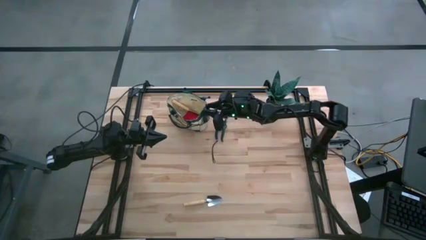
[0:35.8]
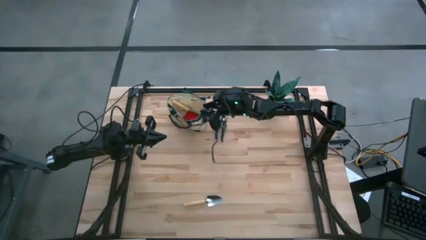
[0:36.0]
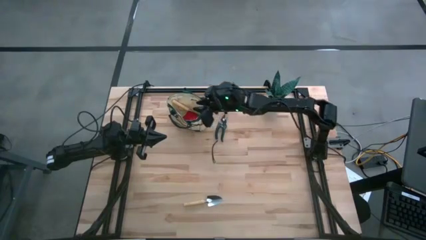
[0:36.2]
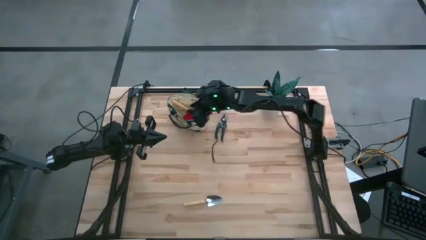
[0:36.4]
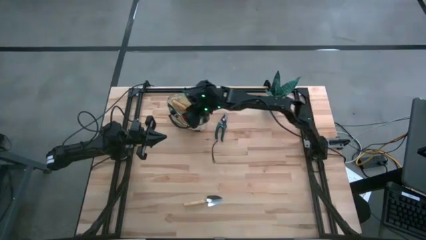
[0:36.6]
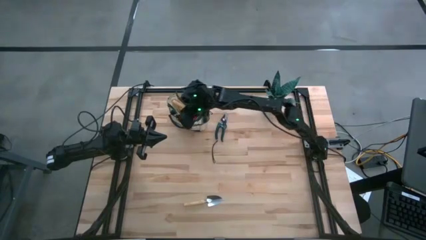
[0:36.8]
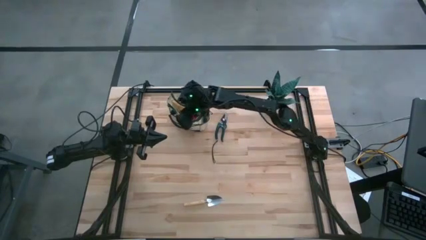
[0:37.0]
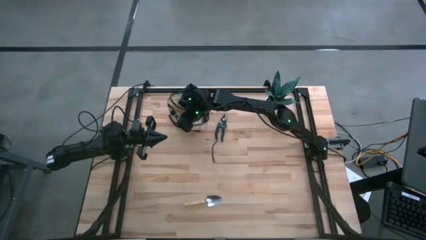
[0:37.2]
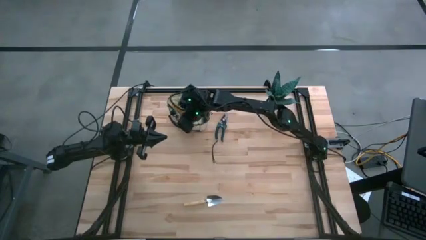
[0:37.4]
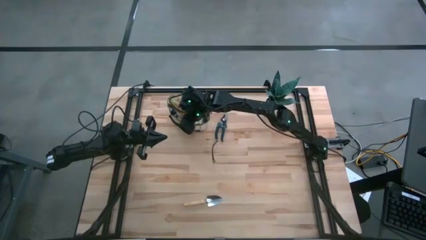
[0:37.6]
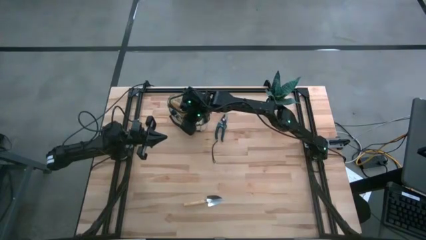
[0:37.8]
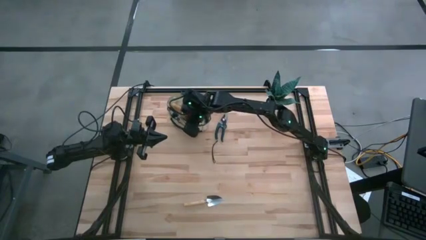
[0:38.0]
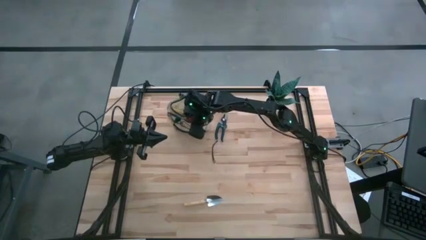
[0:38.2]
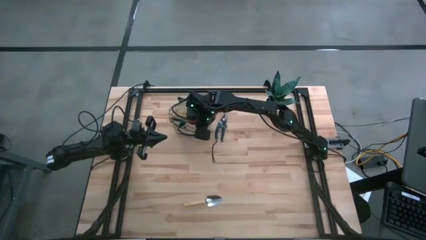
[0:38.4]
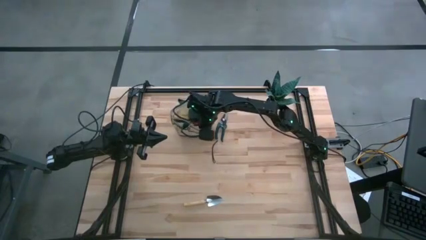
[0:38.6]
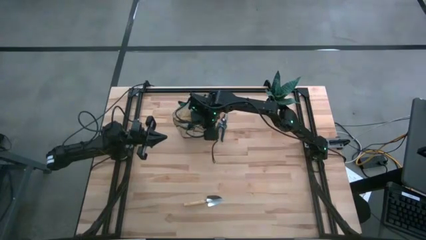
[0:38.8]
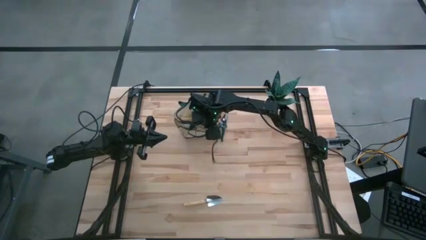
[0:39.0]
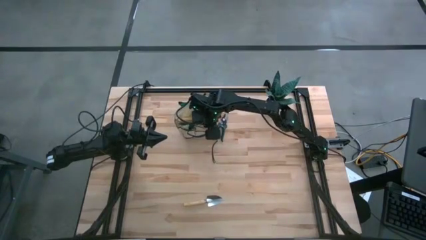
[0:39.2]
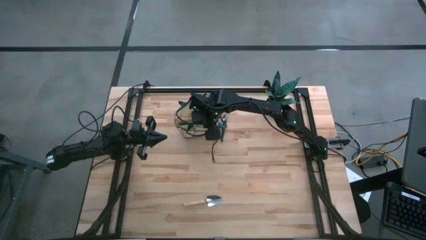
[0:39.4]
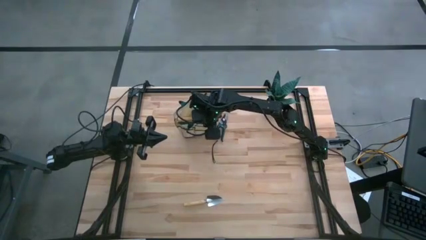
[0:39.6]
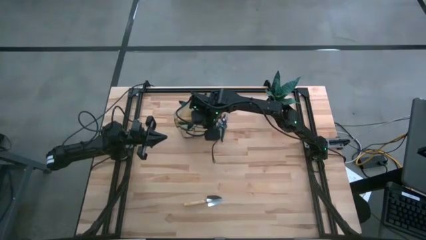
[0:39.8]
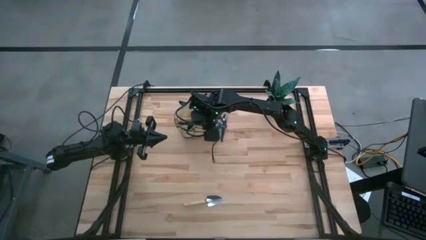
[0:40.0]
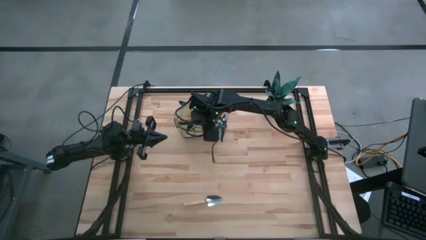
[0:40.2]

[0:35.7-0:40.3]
Task: Pick & Place Garden tools in Gardening bag
Adjust the gardening bag

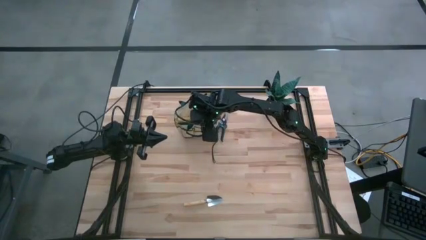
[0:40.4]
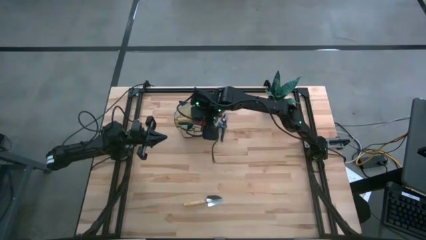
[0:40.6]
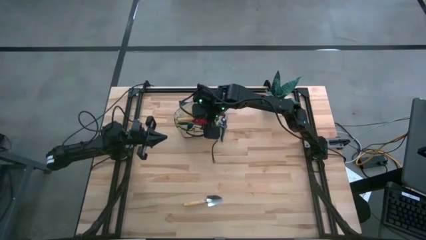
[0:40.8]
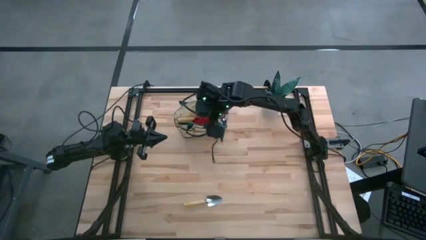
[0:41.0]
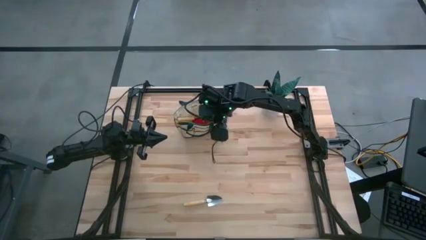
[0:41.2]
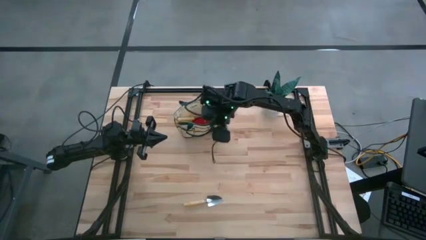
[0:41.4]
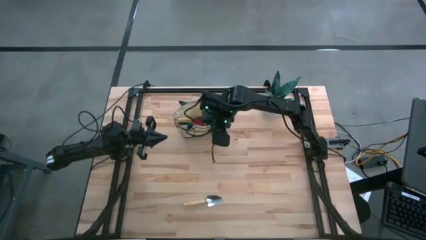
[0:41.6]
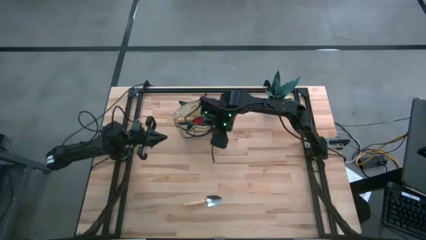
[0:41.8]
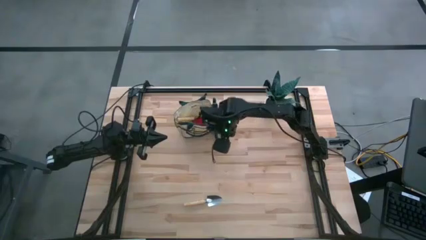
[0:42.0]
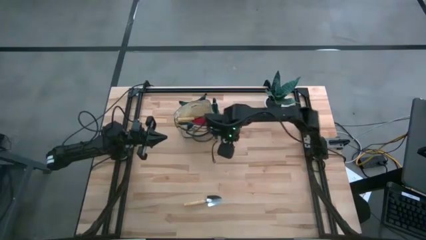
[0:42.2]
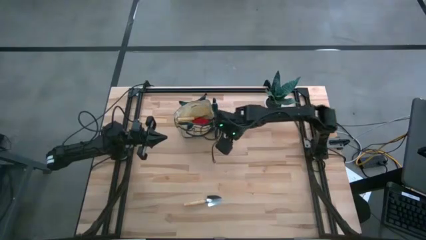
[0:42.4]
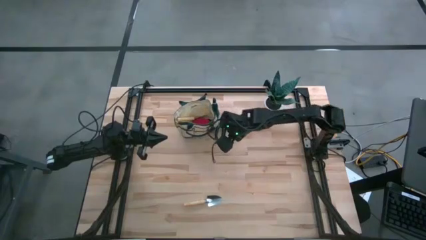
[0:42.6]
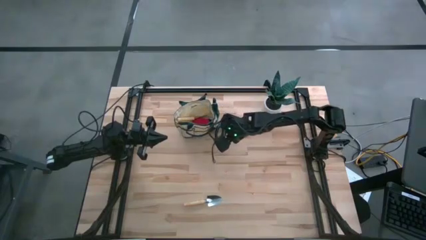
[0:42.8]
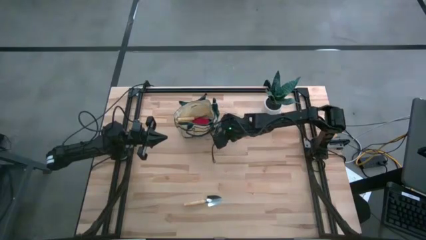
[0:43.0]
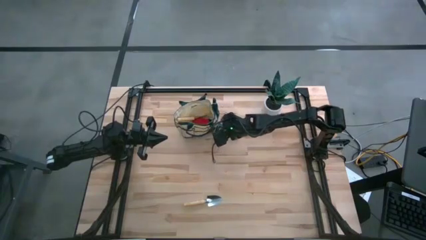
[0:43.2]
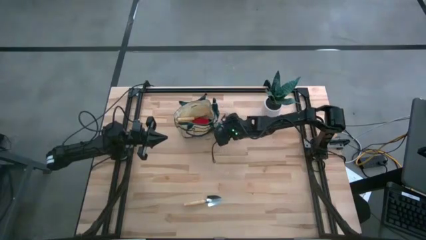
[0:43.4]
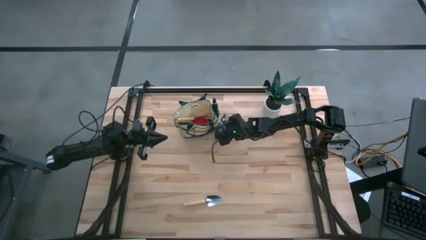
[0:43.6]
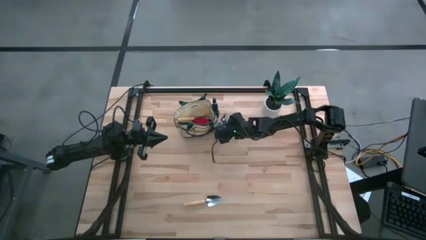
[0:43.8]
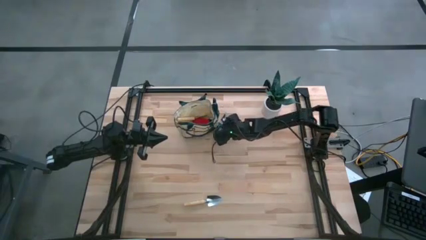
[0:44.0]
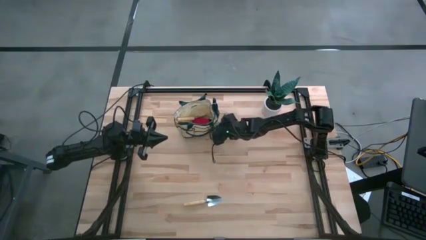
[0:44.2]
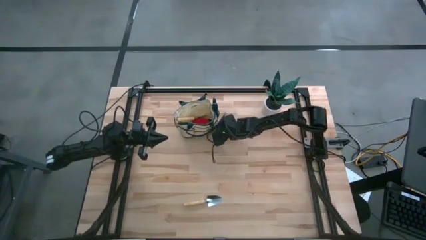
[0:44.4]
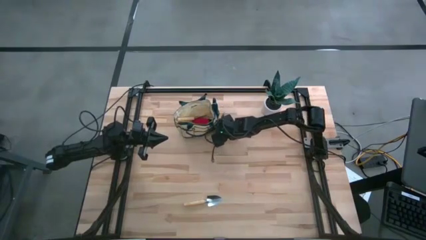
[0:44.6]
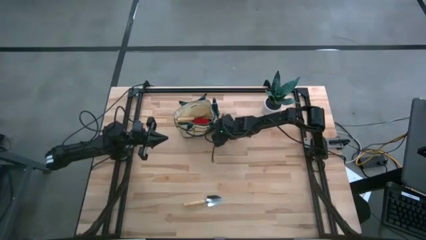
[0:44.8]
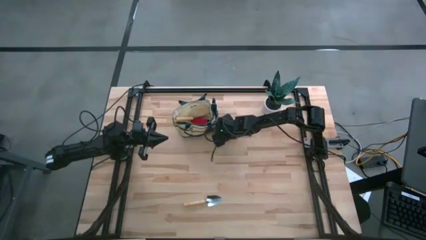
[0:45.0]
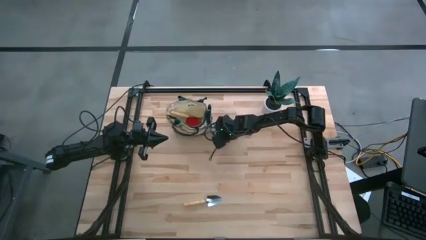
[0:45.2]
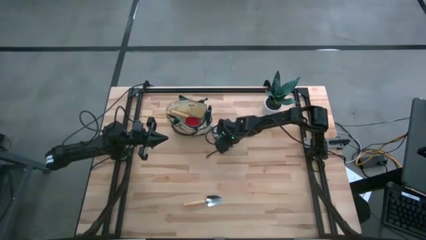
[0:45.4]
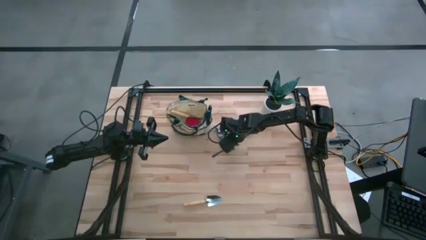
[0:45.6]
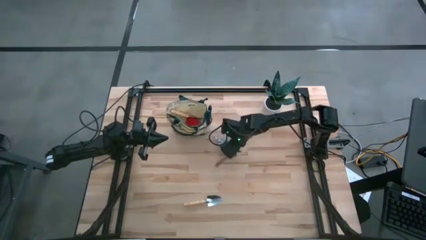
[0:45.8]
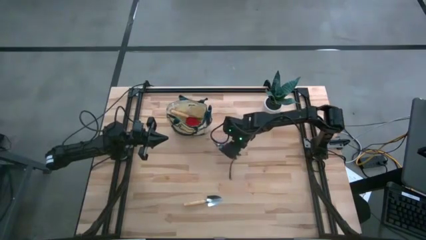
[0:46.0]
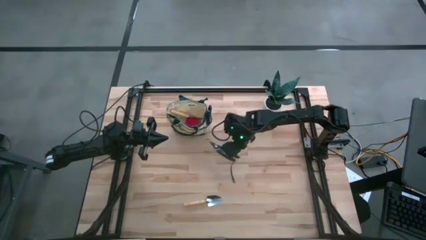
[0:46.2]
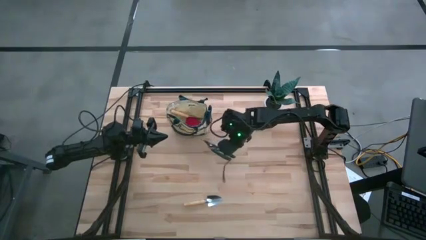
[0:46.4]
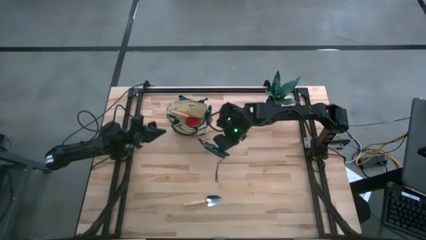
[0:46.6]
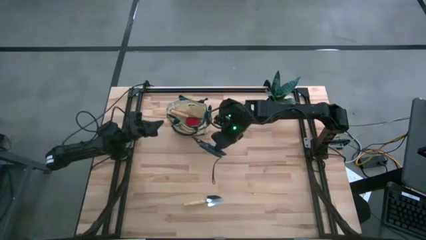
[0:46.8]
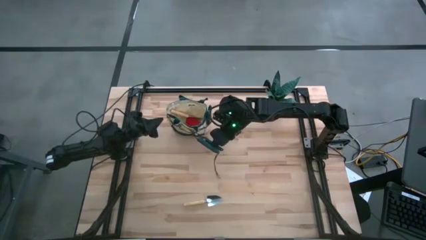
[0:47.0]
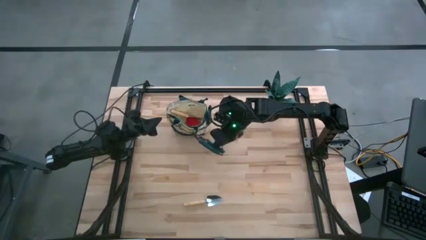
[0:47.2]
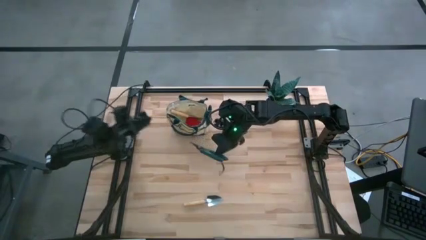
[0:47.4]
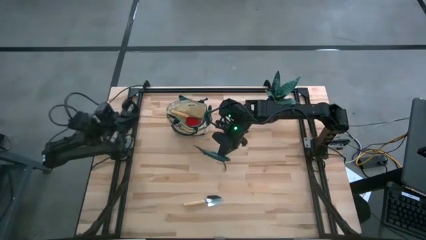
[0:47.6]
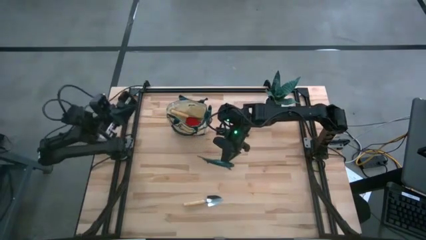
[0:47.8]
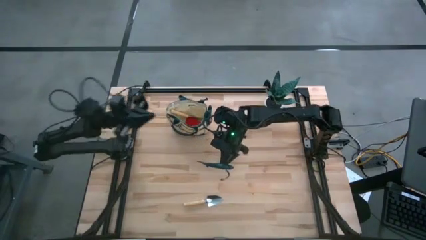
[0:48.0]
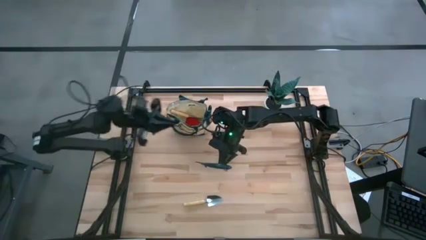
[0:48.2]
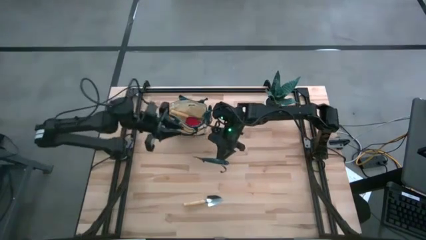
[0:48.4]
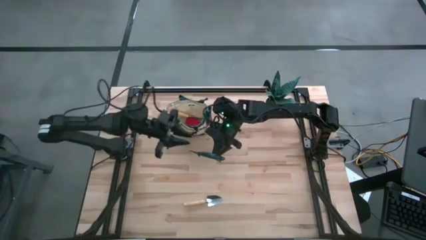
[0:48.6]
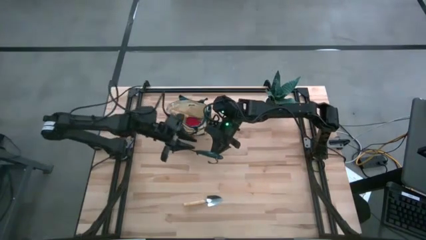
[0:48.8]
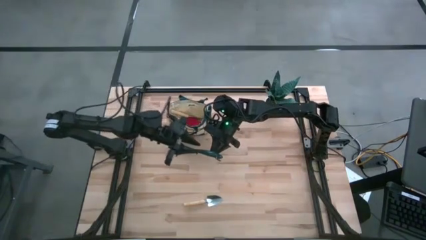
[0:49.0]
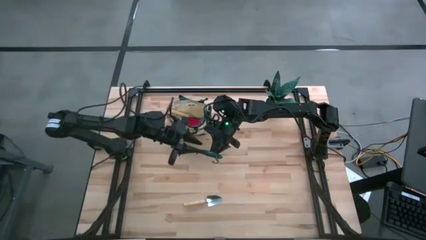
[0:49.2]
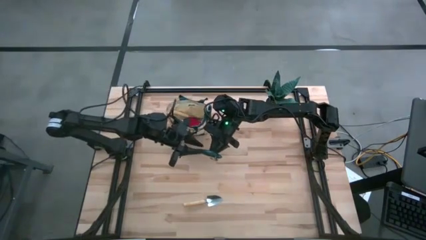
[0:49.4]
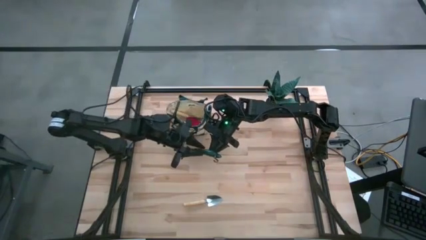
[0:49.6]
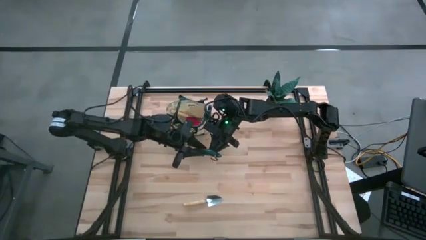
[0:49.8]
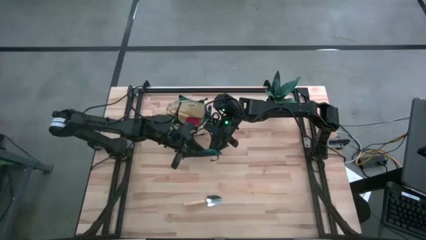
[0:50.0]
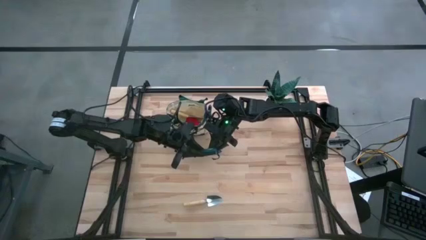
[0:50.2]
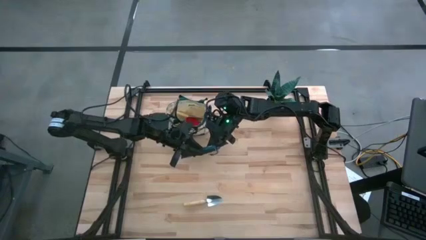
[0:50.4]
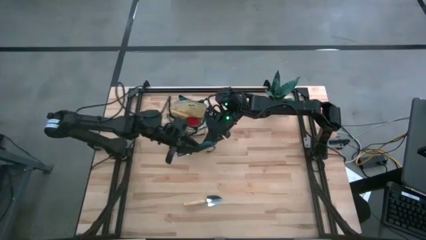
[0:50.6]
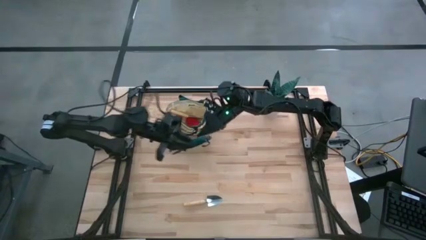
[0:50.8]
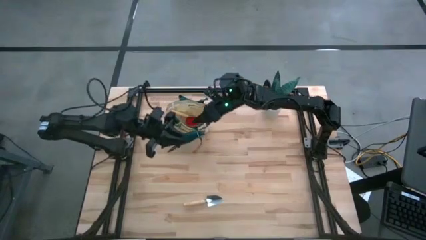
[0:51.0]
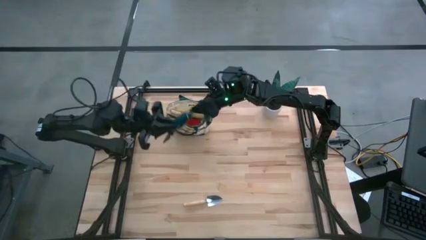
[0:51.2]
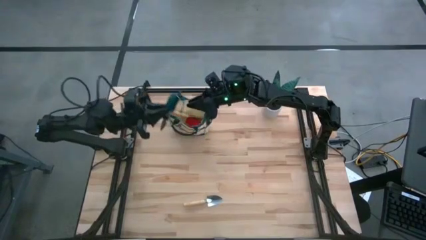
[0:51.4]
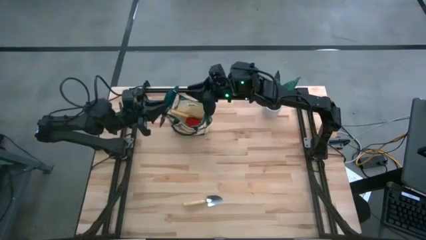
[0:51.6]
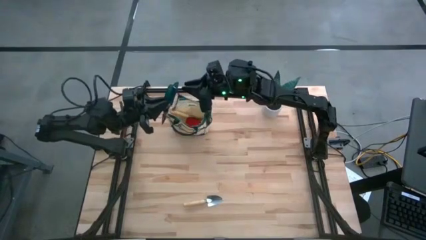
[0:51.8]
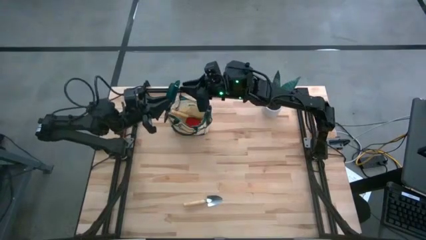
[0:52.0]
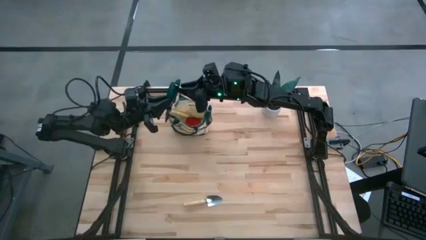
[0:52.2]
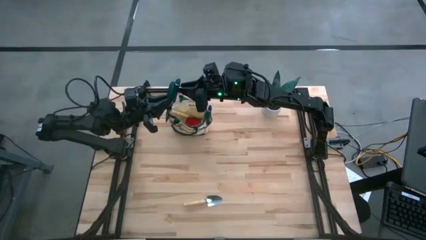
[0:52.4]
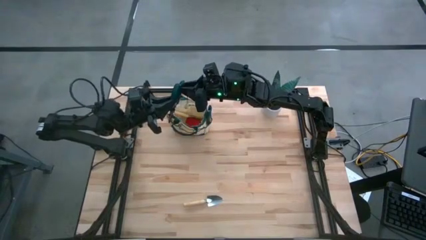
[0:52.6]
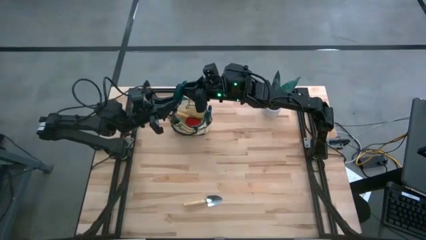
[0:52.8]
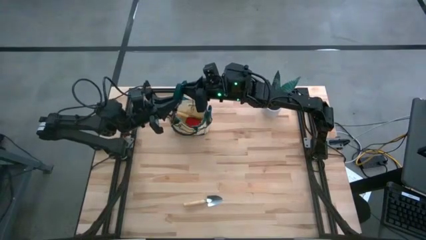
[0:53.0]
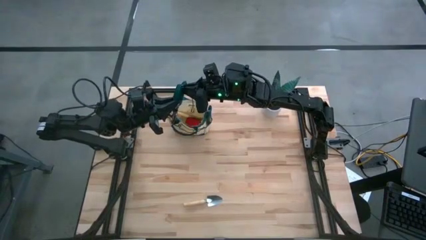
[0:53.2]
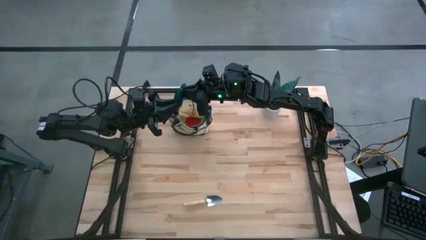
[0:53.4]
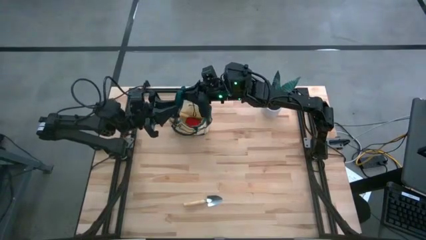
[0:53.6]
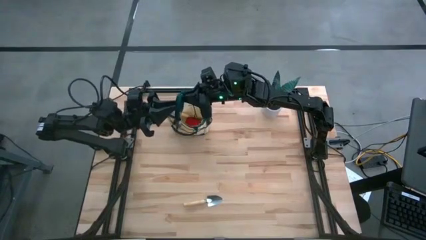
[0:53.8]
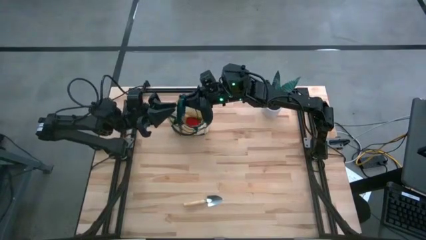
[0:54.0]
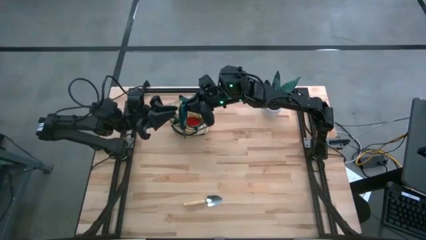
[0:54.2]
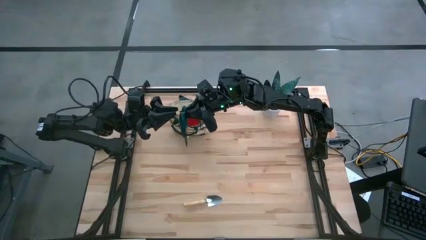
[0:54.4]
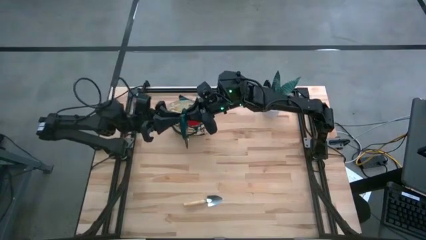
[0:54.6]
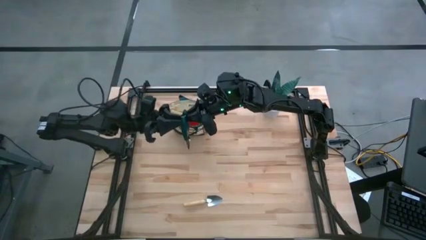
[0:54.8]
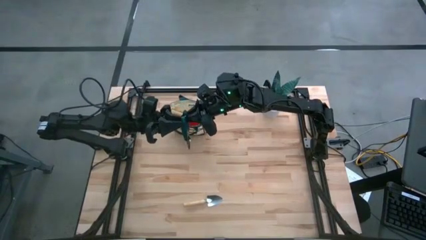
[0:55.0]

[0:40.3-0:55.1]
Put the shear scissor into the gardening bag
